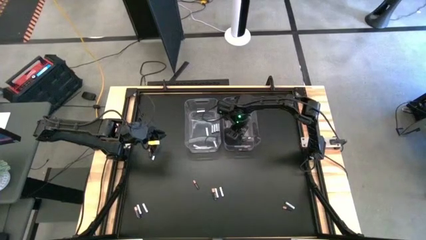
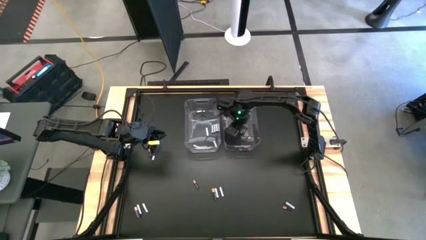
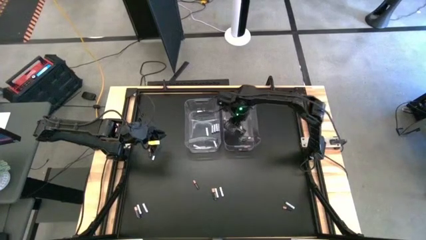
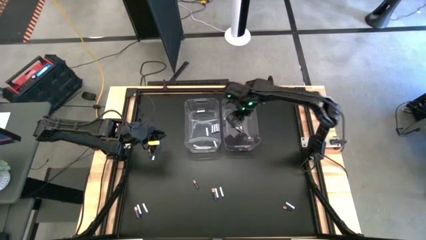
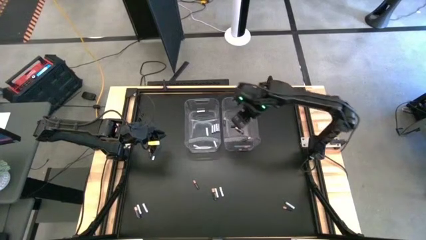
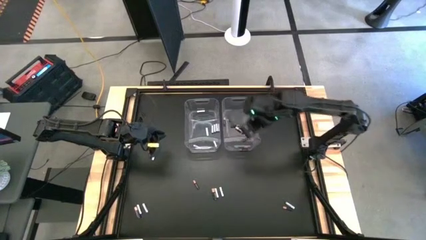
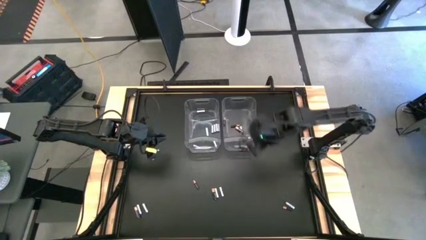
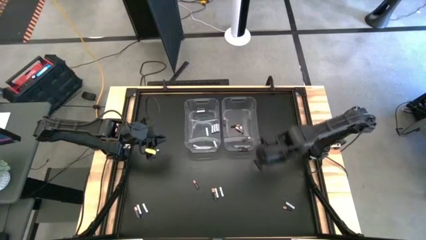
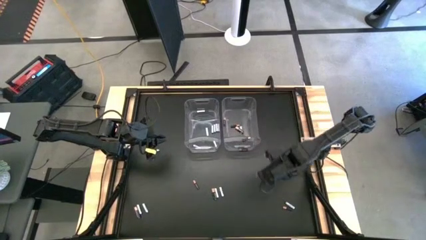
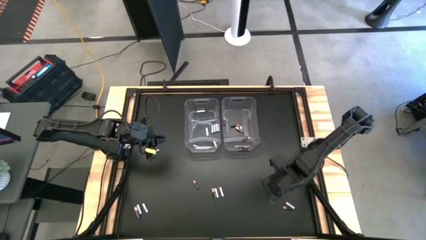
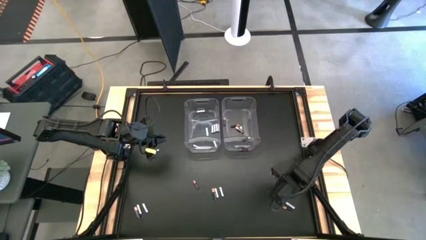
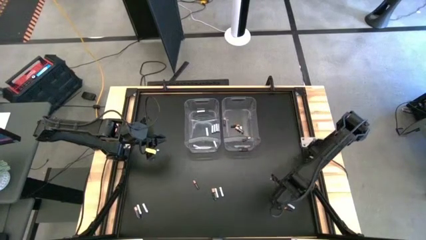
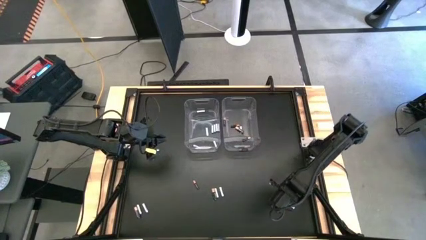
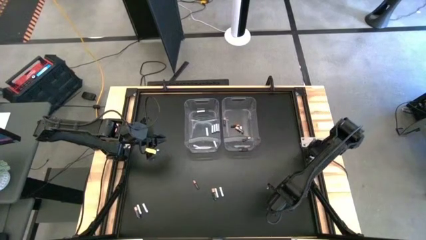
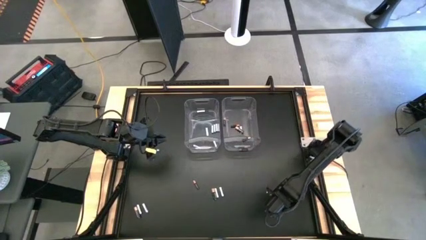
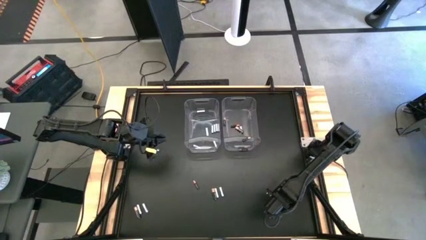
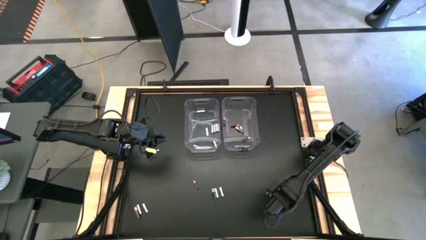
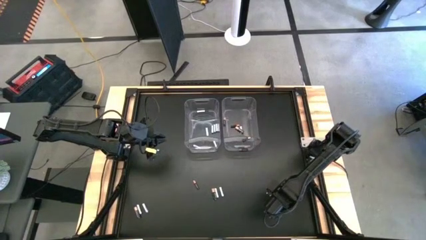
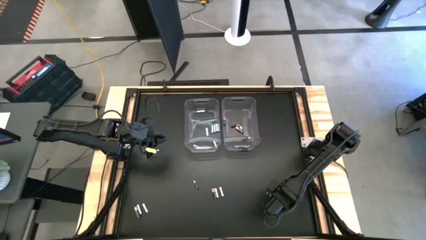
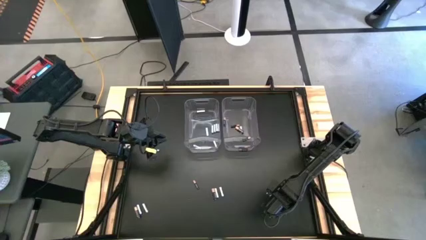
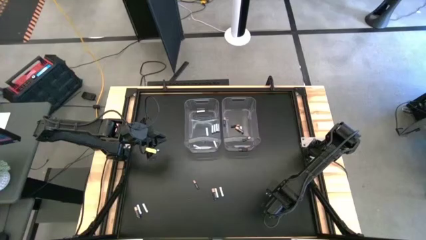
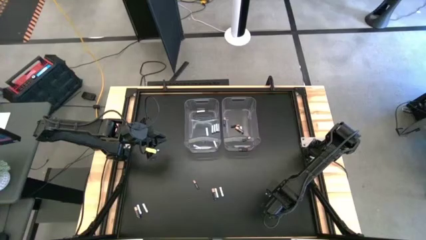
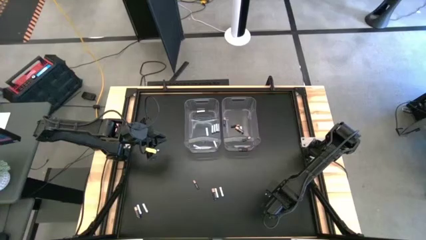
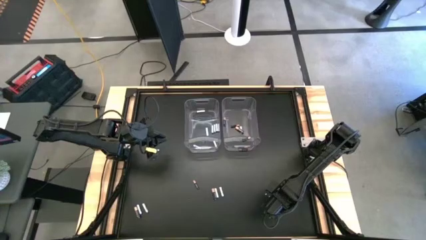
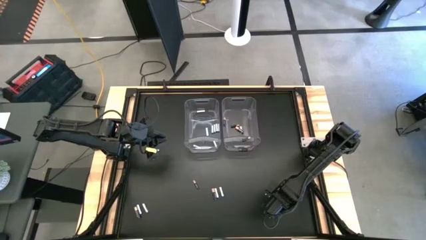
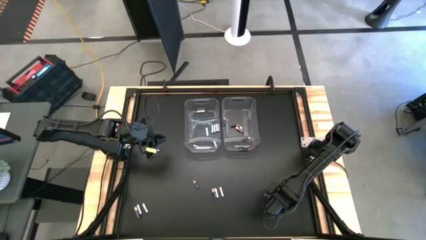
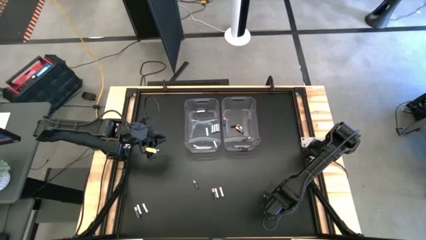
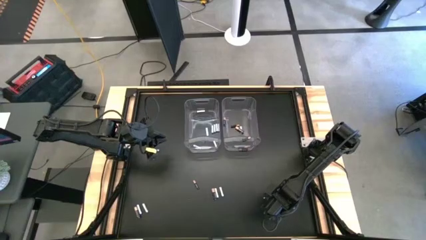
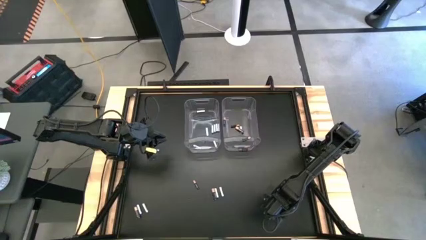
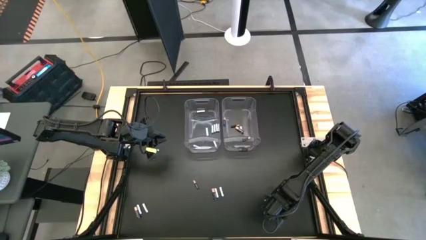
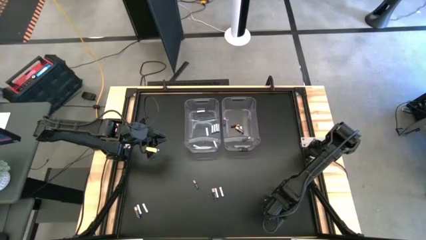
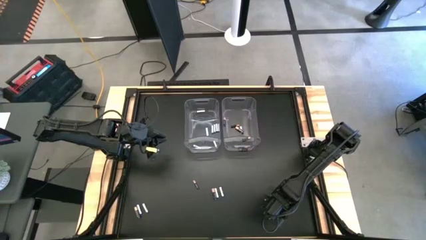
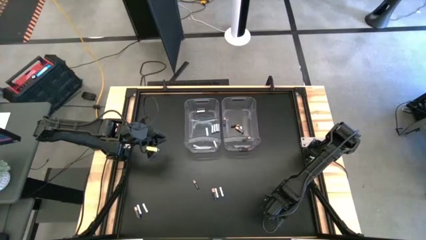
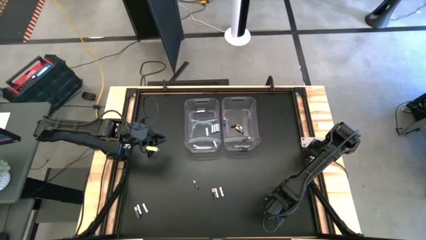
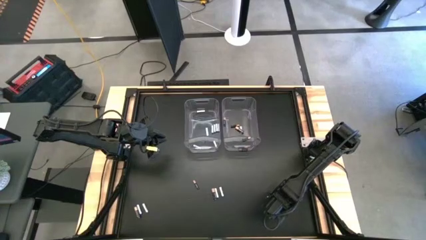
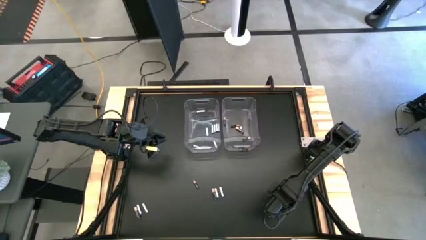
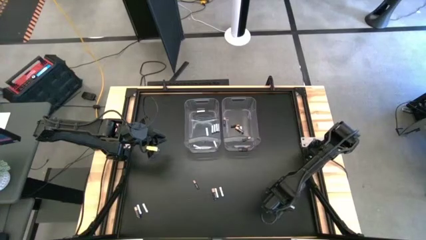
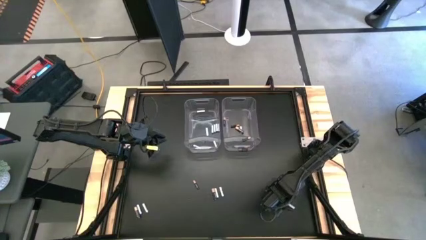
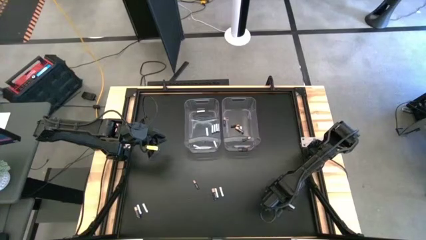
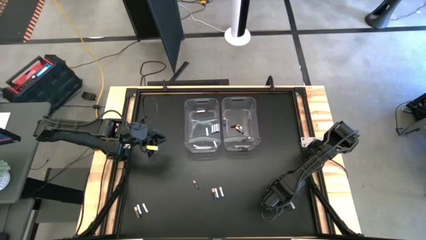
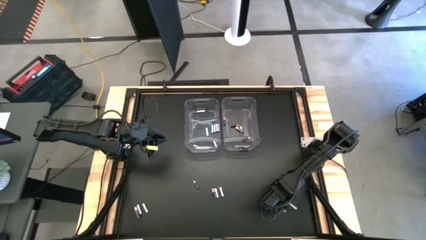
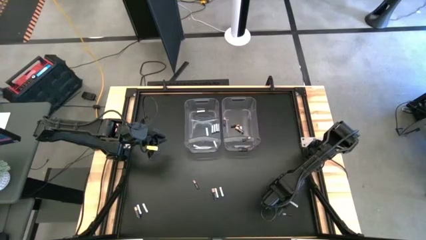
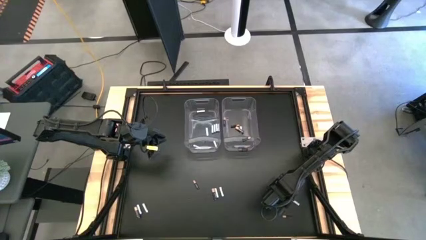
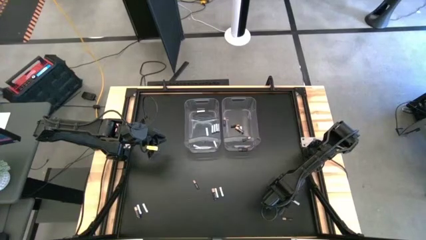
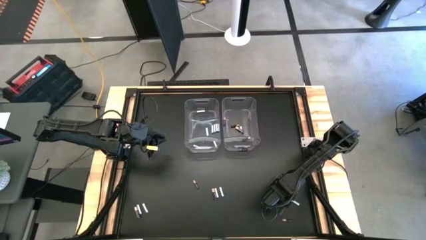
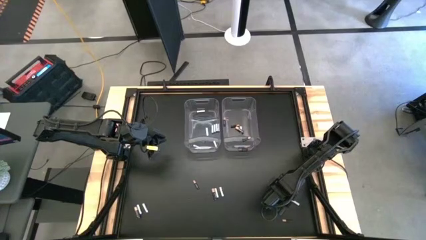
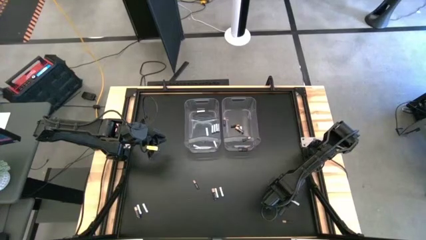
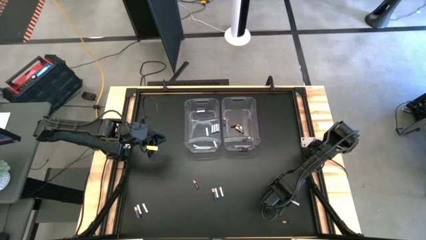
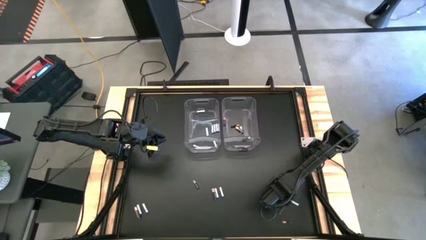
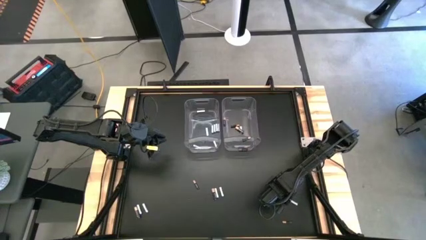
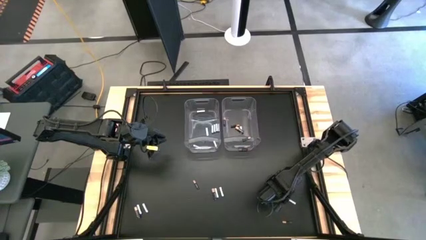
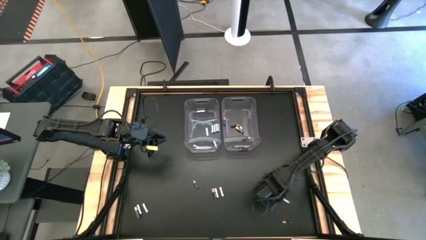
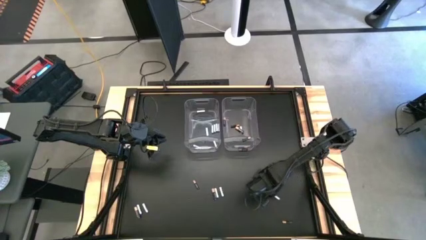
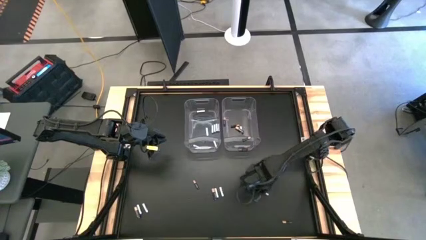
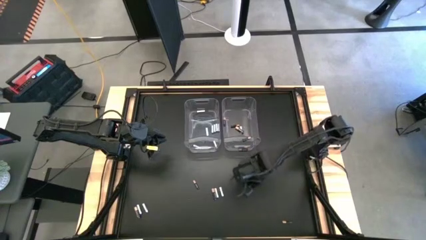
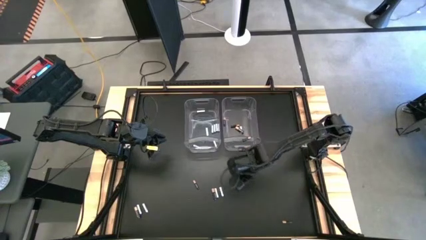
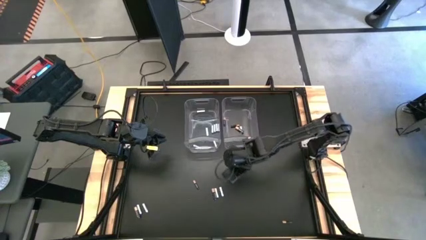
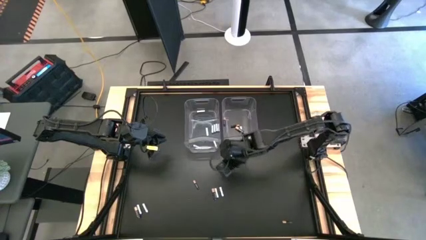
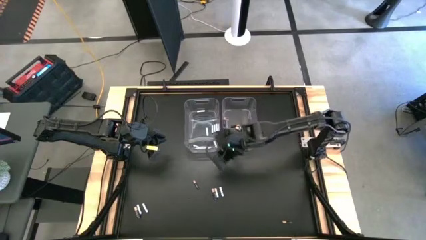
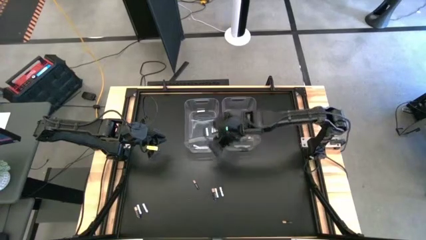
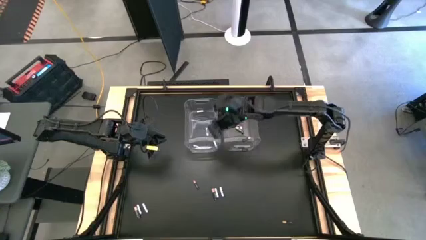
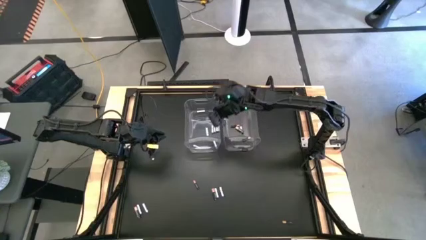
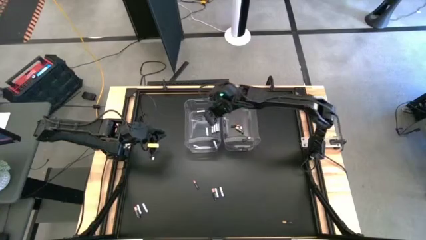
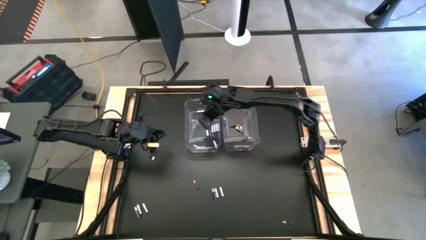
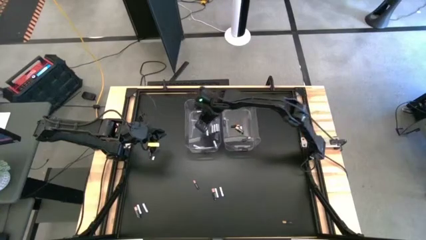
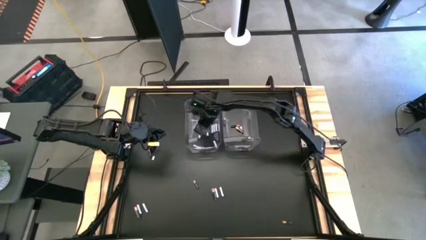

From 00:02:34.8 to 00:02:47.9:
Task: Sort batteries
Put the white battery into the left transparent bin

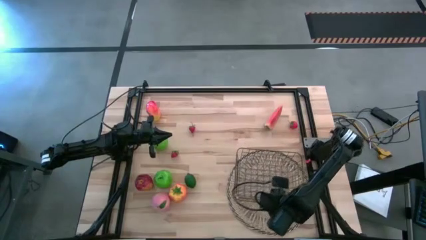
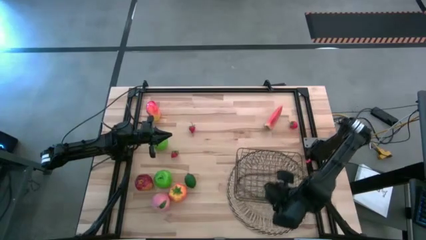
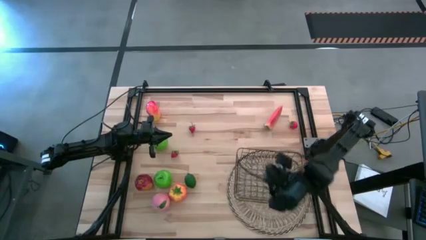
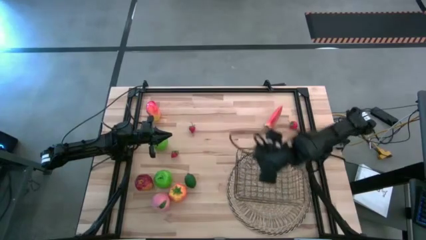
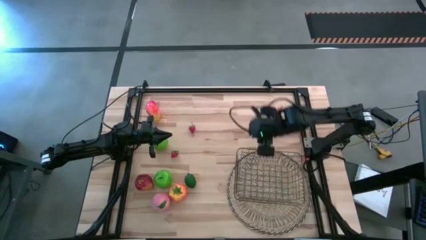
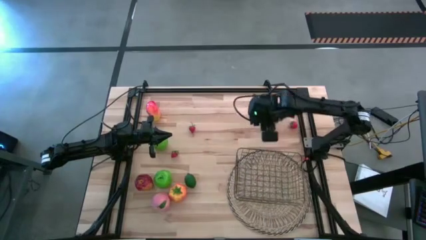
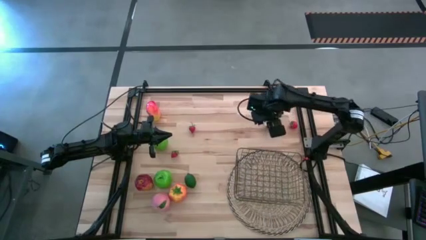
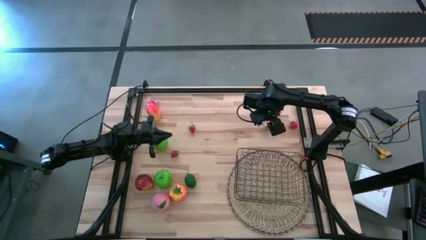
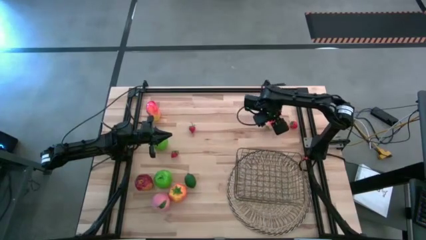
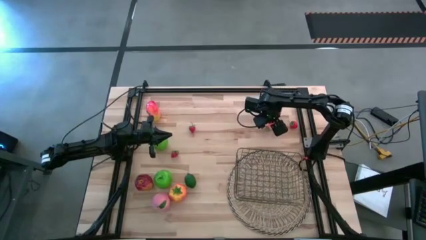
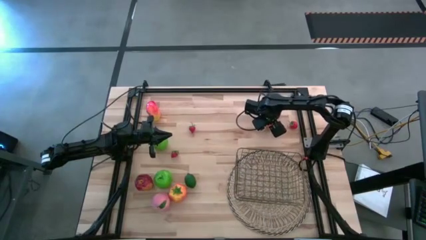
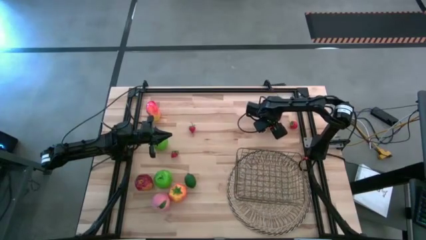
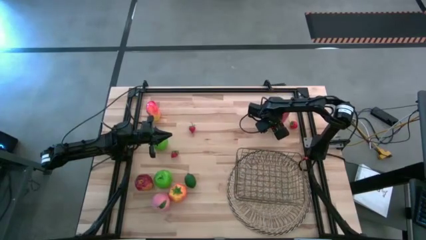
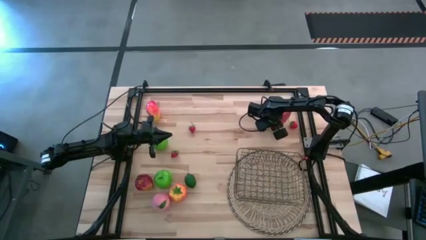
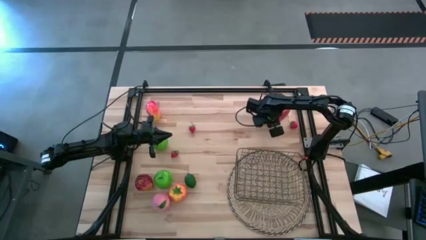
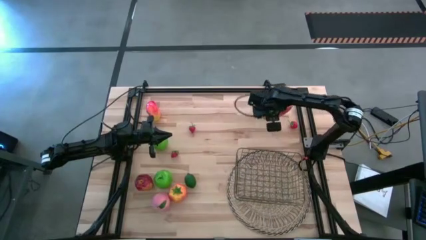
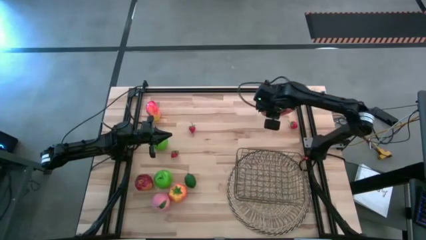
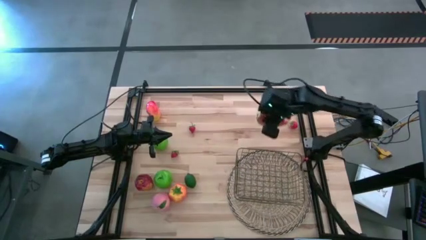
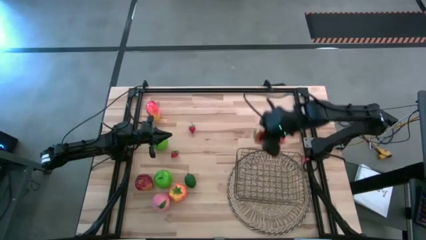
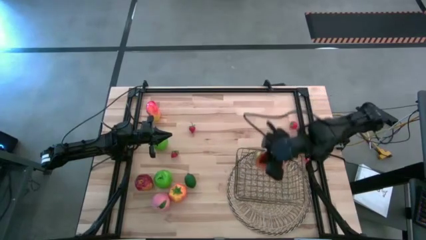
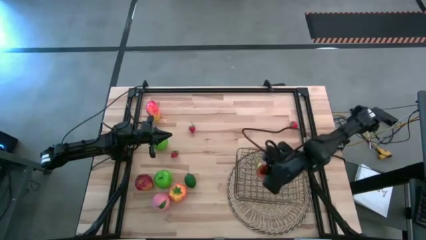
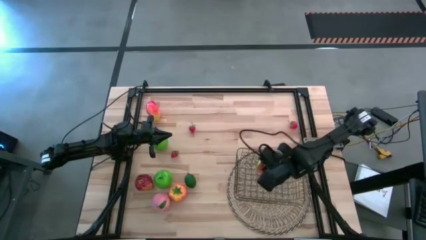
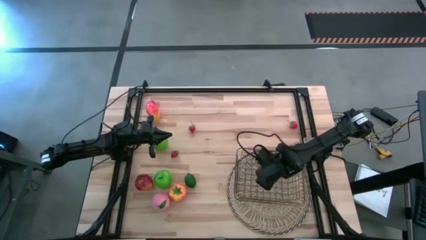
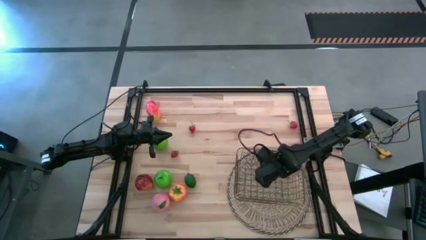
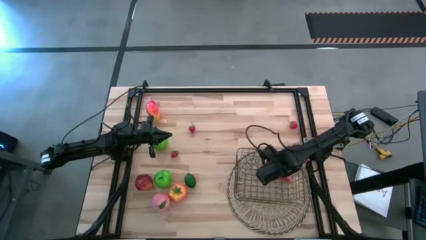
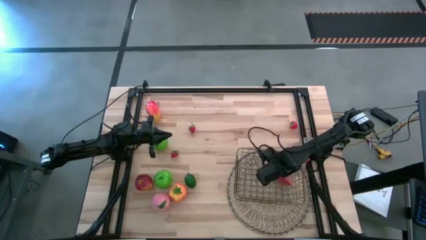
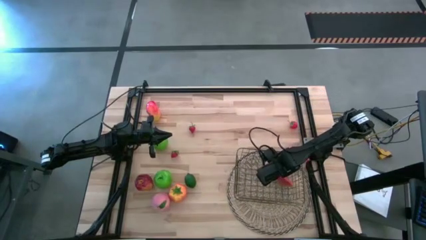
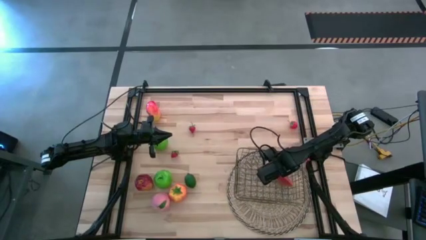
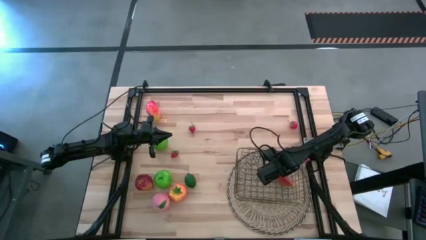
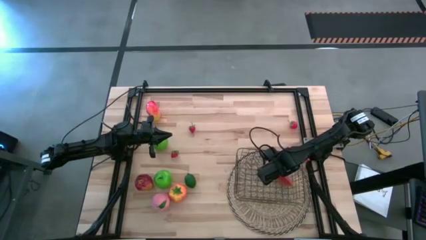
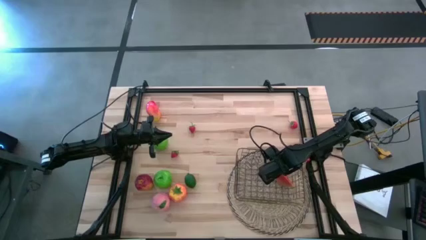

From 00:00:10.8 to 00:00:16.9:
Task: Build produce basket
Put the watermelon into the wire basket
